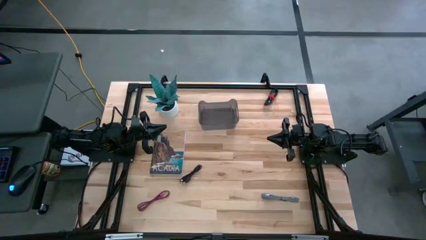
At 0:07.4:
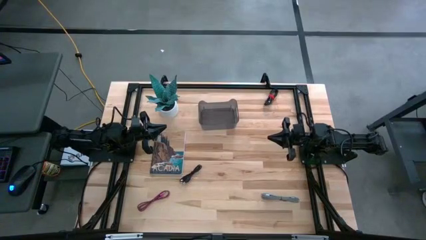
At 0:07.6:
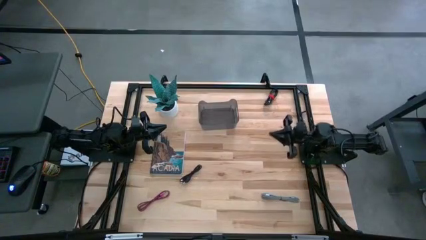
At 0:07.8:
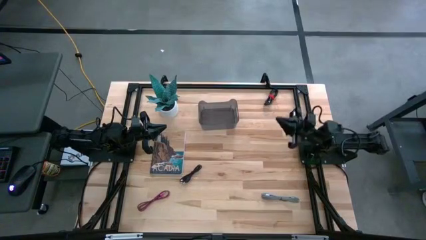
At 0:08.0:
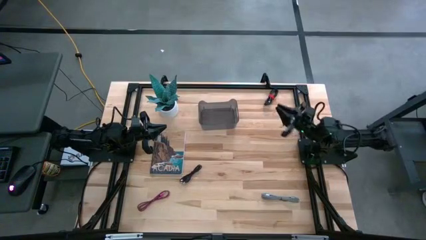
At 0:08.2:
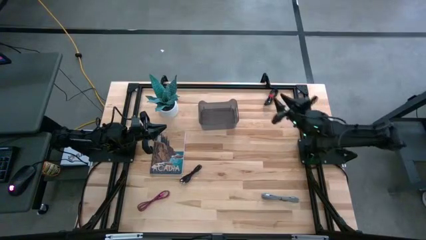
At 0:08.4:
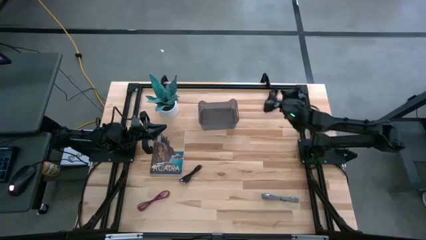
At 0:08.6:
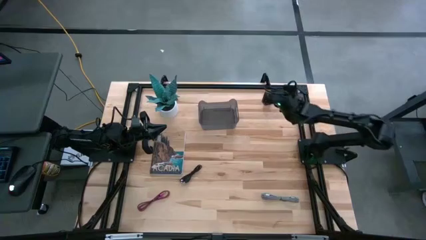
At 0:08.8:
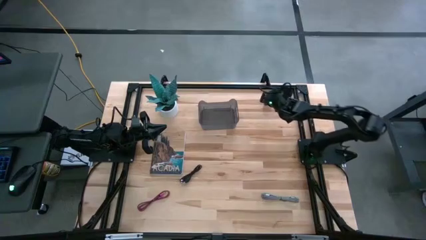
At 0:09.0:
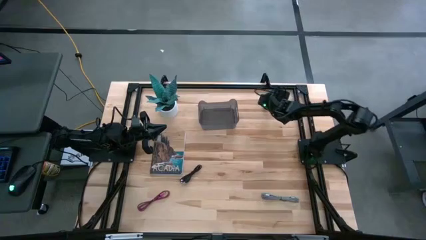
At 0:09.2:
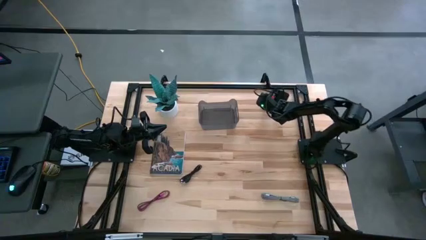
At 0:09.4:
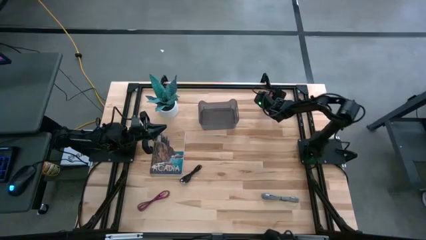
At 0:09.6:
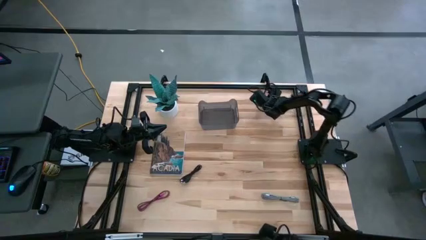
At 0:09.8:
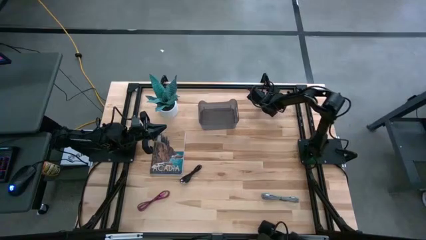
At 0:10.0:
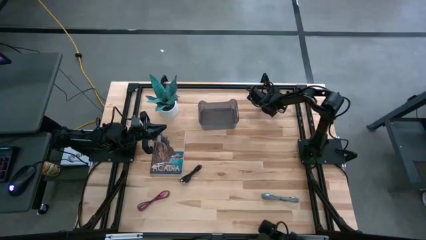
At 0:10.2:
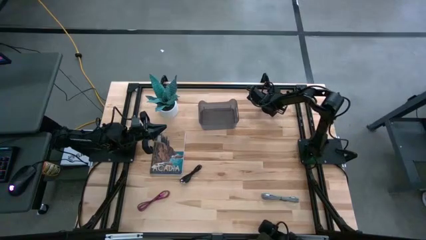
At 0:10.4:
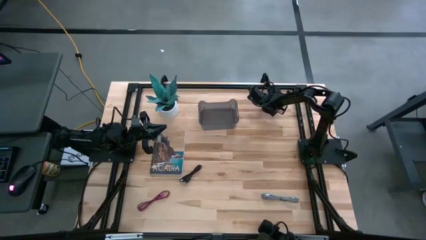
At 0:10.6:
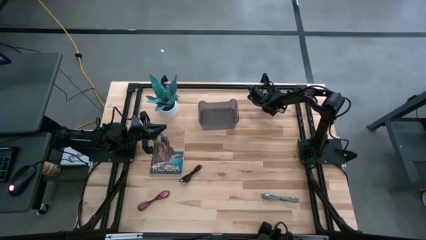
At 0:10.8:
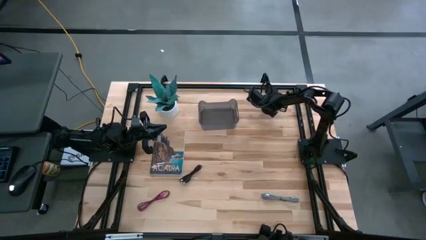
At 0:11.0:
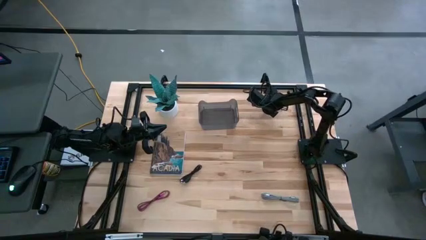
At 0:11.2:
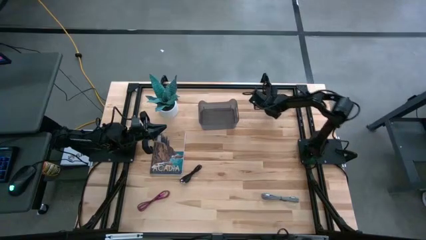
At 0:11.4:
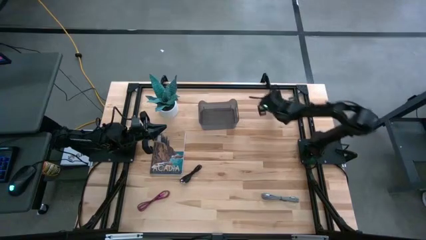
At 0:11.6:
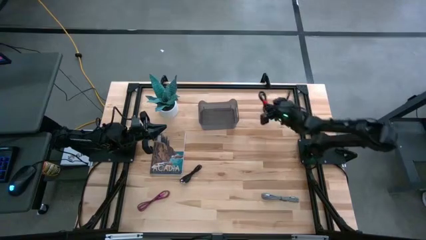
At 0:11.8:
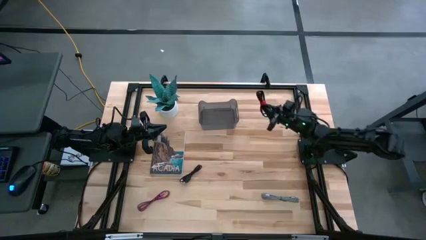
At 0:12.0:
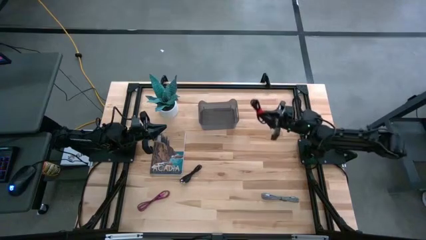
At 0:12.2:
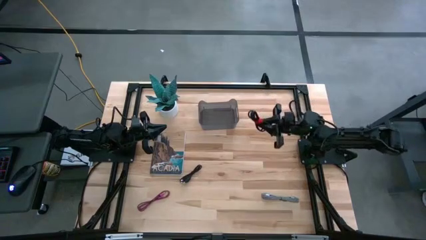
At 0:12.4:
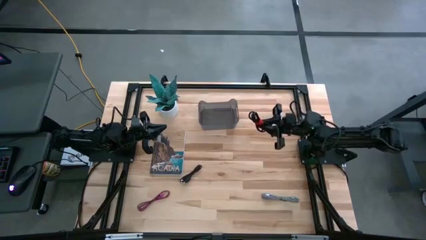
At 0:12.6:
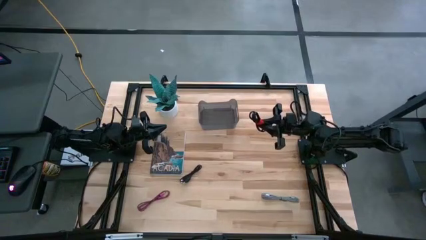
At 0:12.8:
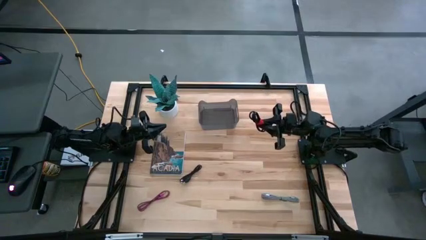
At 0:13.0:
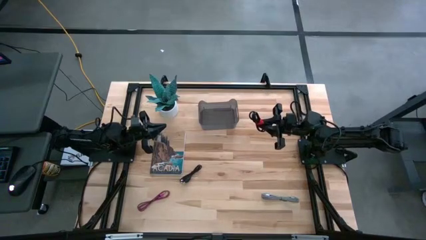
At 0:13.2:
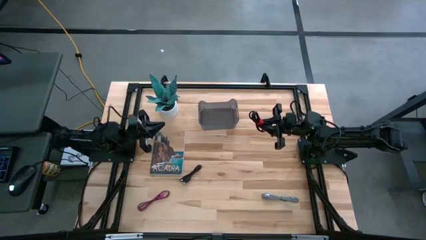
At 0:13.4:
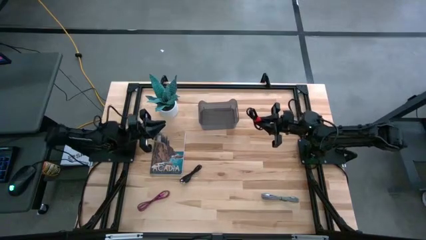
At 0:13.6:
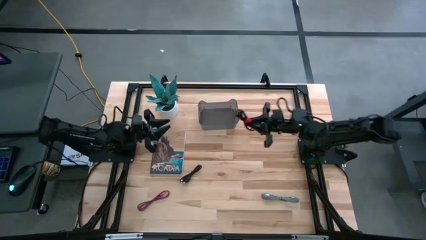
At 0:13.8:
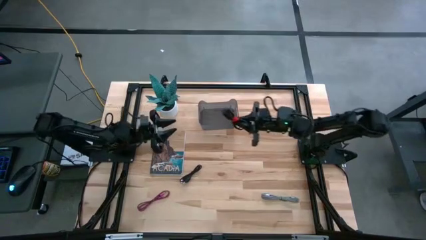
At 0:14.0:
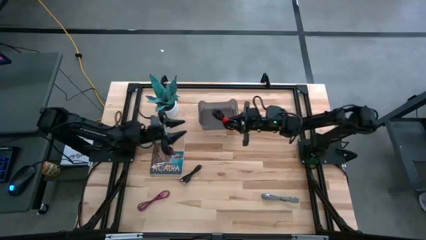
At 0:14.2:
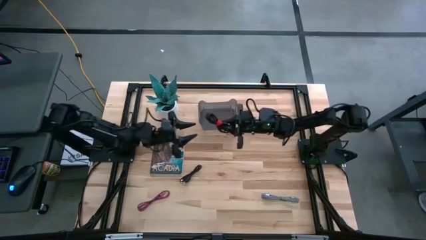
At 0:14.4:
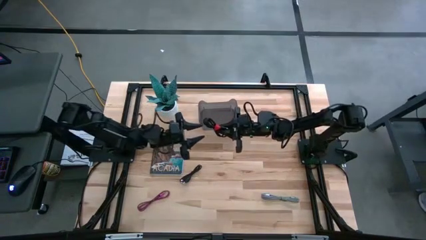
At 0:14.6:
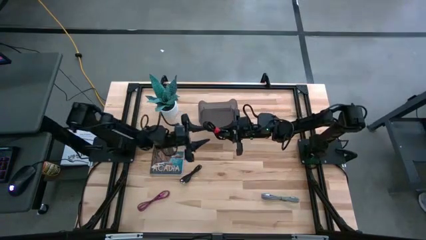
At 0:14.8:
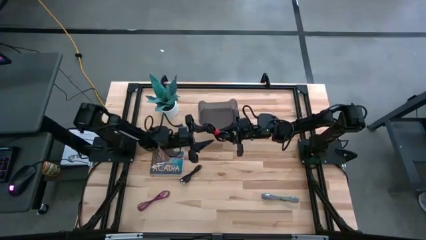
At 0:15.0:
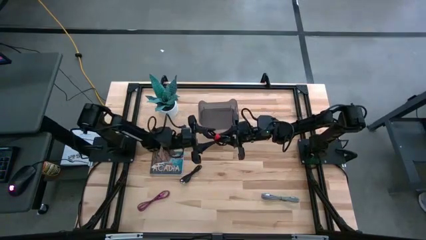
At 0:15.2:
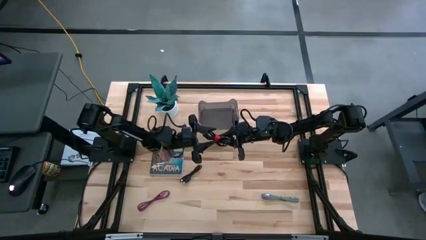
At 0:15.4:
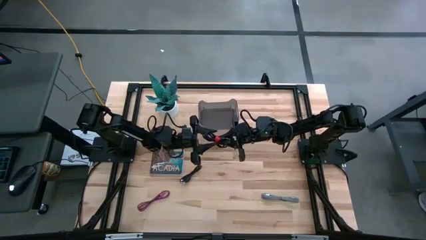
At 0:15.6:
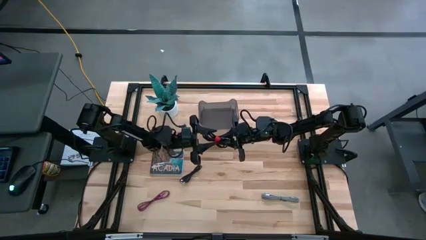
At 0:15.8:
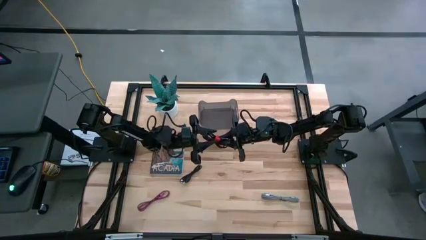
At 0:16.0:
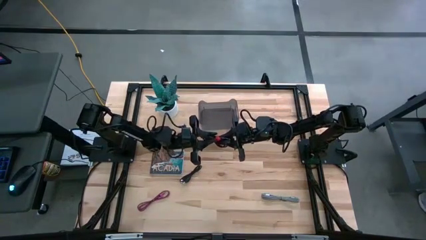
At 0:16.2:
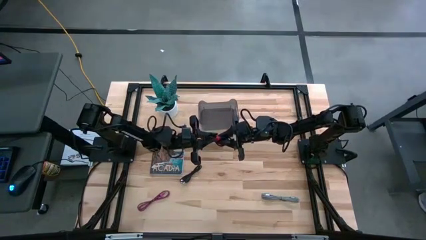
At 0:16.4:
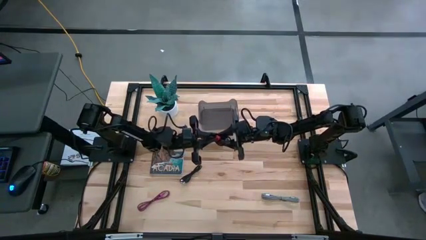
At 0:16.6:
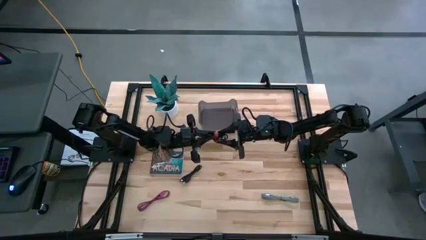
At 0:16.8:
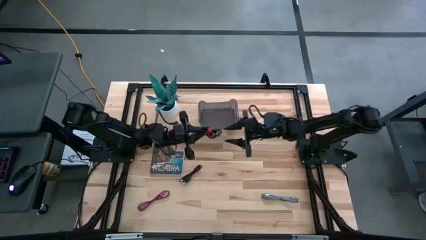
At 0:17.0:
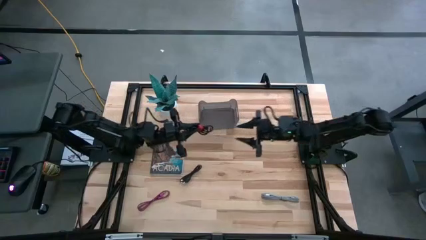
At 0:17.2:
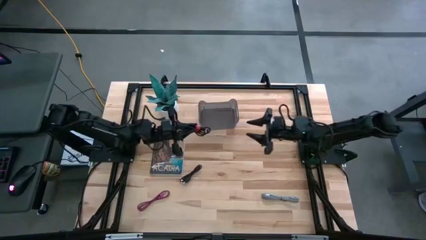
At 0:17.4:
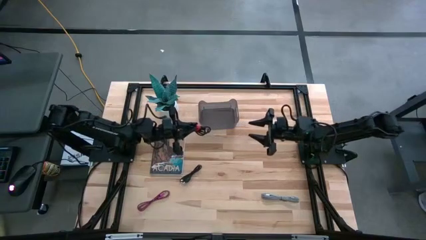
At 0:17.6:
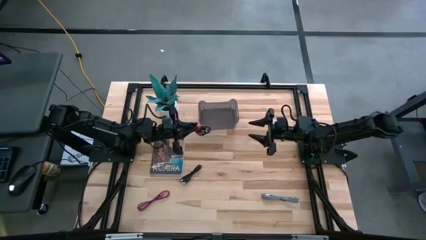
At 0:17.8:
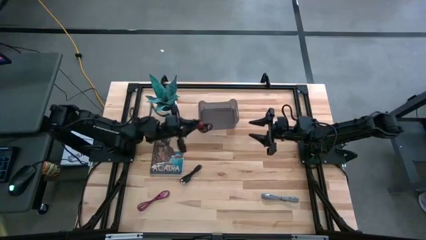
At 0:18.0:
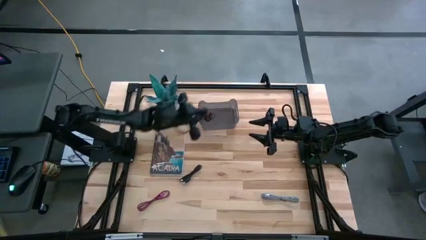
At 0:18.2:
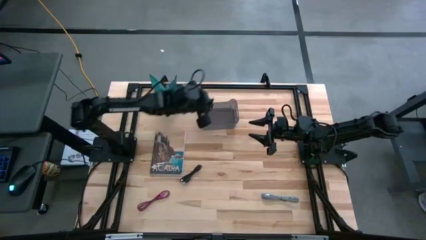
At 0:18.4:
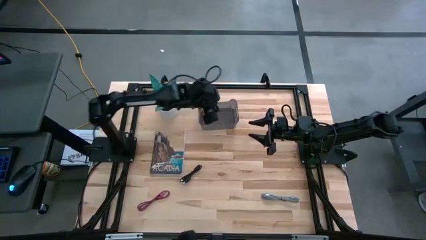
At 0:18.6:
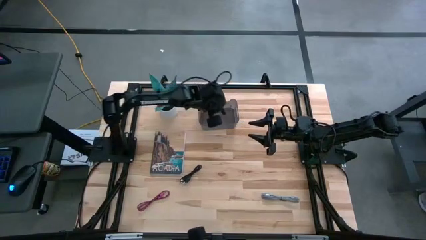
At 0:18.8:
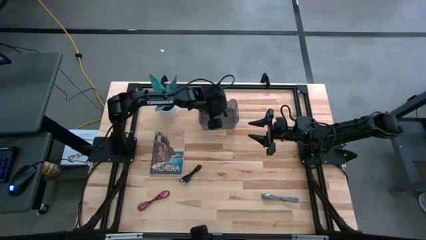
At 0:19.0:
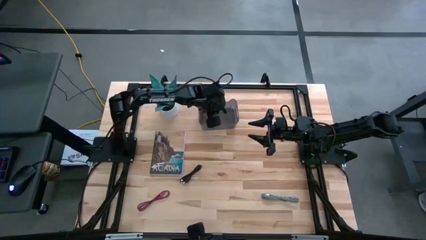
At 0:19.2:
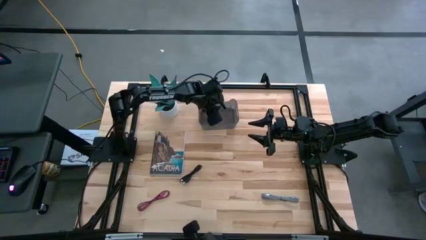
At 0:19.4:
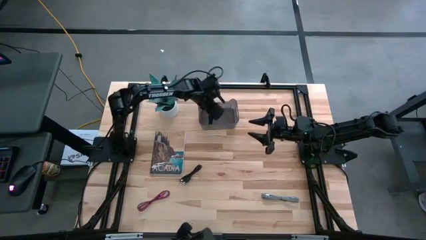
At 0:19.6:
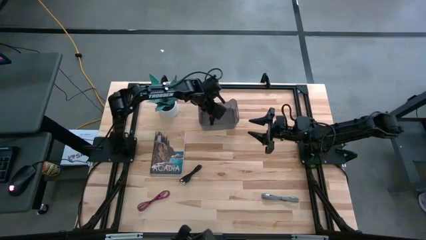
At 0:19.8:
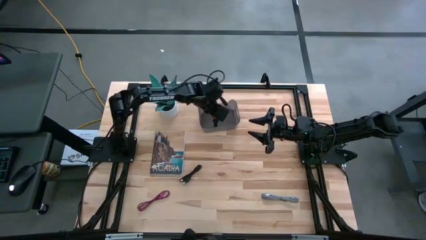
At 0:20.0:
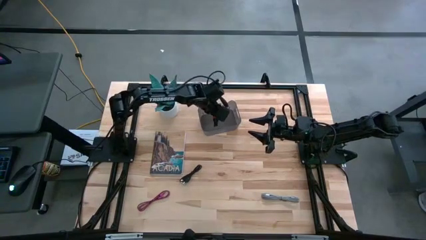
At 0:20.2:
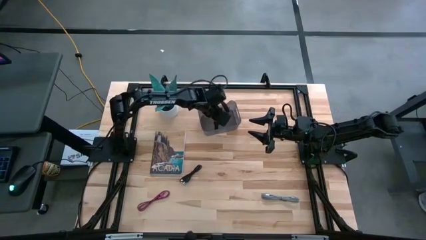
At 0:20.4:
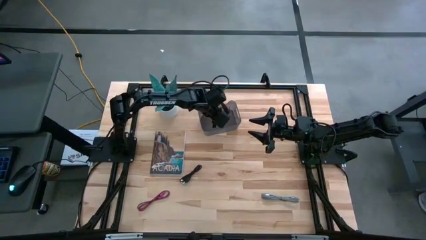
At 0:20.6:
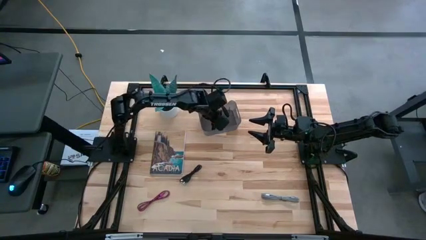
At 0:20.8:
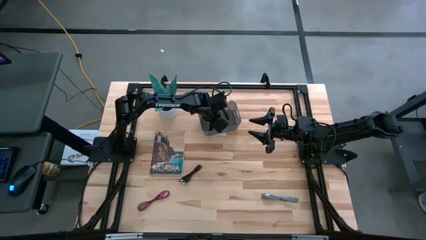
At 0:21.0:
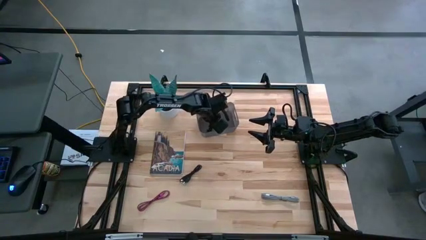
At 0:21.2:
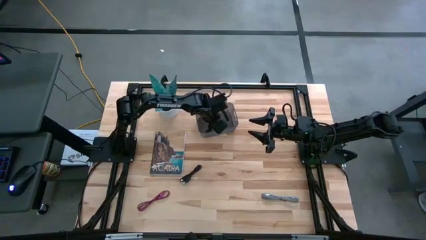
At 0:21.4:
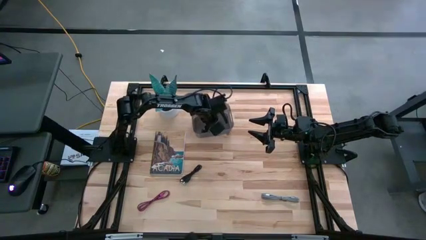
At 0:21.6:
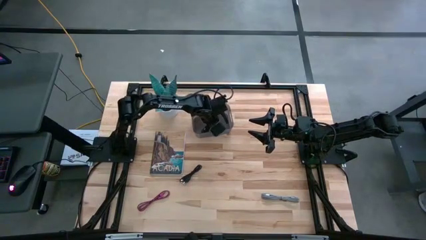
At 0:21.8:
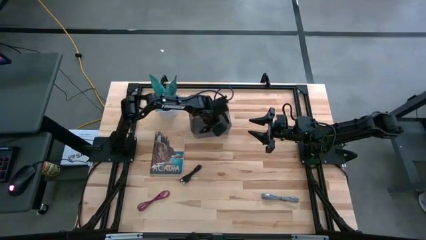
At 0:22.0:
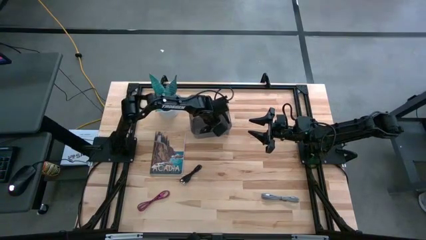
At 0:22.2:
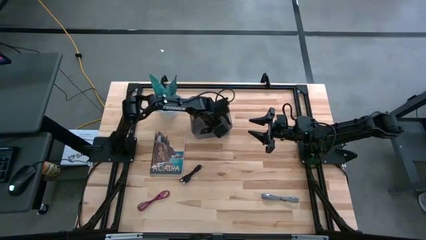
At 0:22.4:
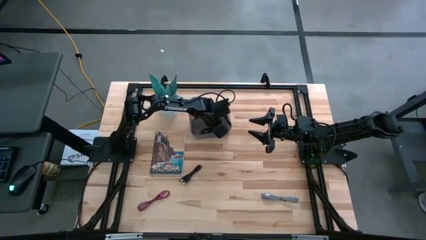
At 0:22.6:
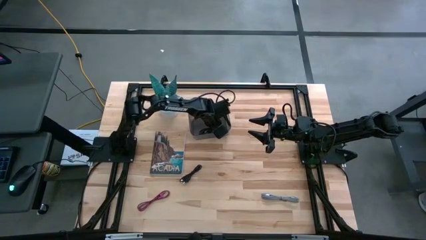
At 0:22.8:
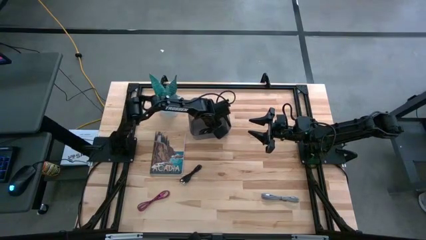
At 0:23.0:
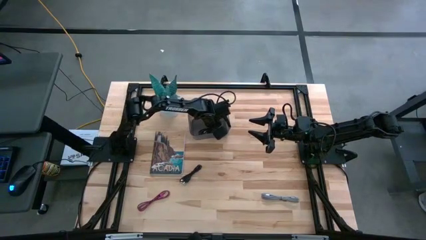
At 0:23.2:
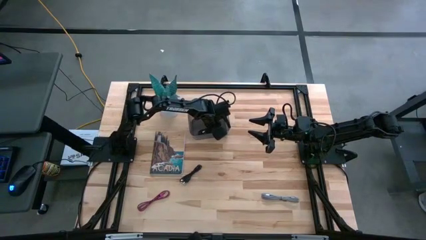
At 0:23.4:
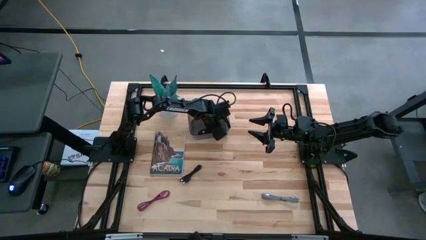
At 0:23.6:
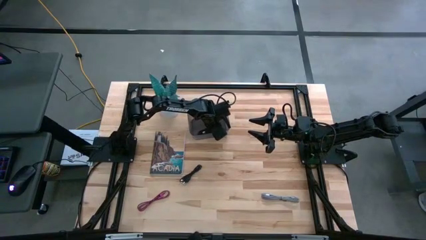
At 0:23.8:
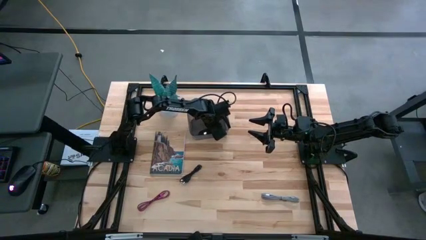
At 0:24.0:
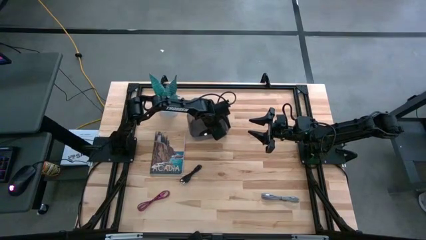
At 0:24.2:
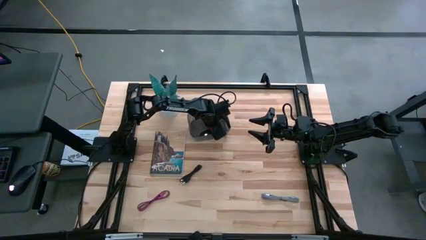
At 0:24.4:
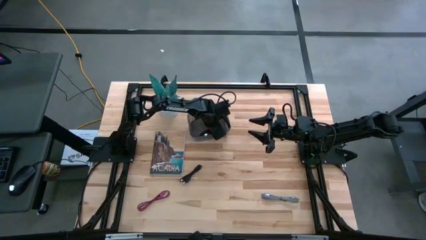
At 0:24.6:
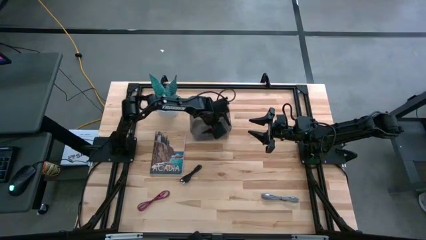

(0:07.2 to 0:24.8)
Task: Pick and place USB-C Cables
Put the top black USB cable into the black bin
